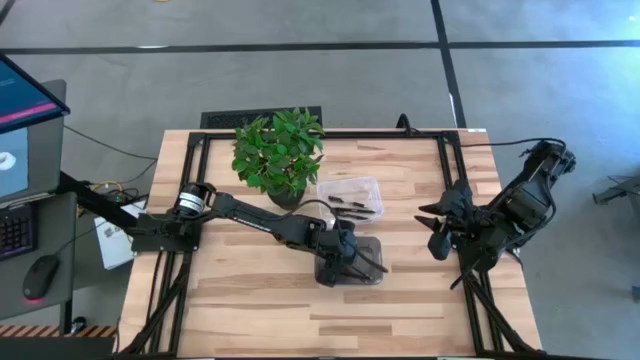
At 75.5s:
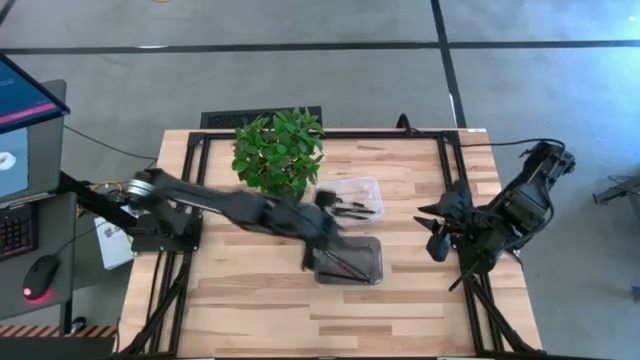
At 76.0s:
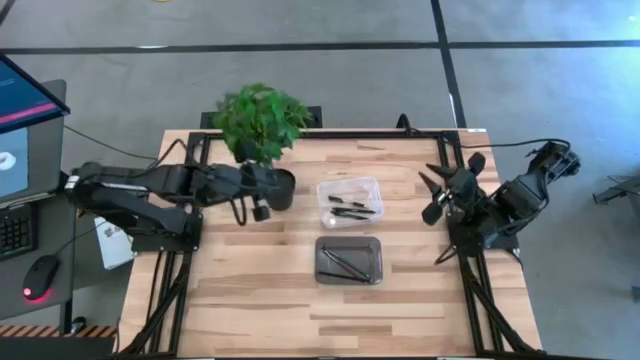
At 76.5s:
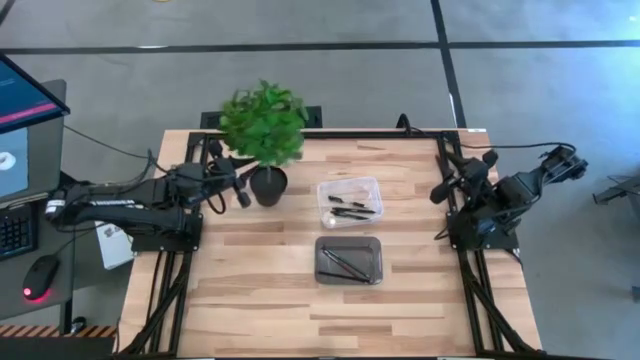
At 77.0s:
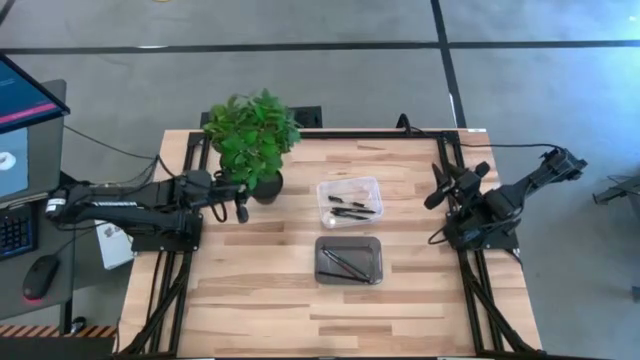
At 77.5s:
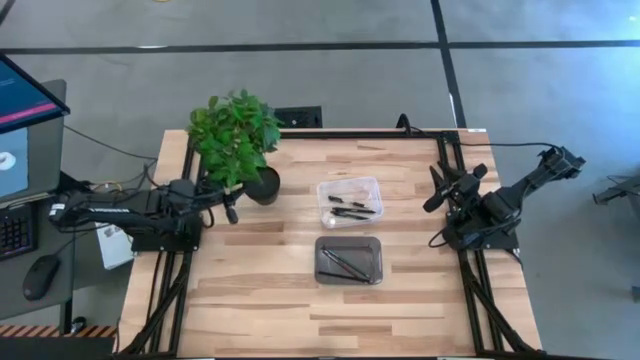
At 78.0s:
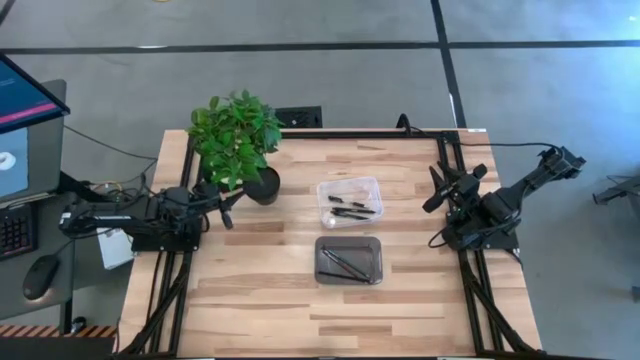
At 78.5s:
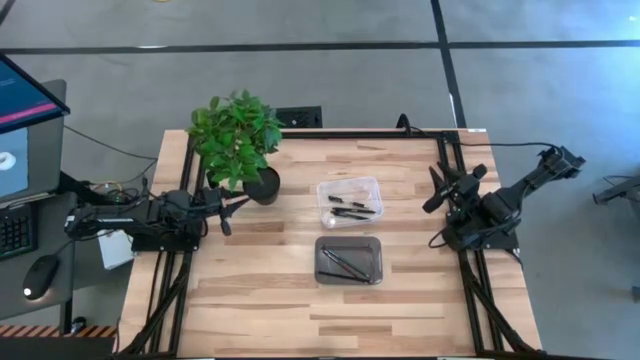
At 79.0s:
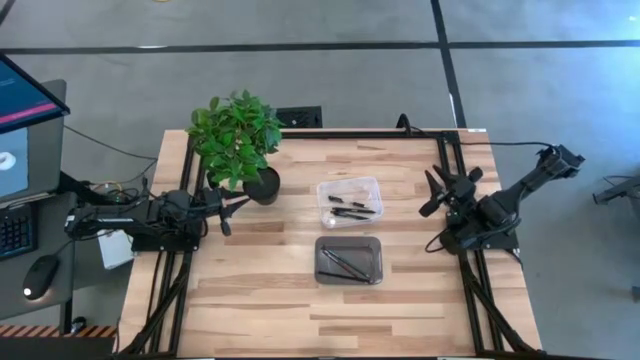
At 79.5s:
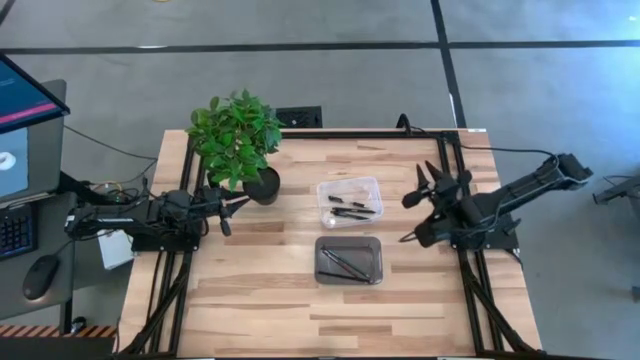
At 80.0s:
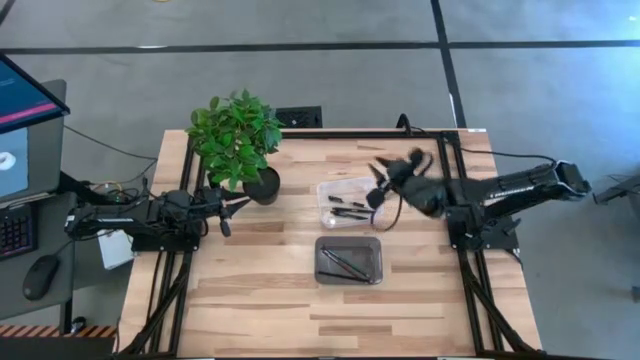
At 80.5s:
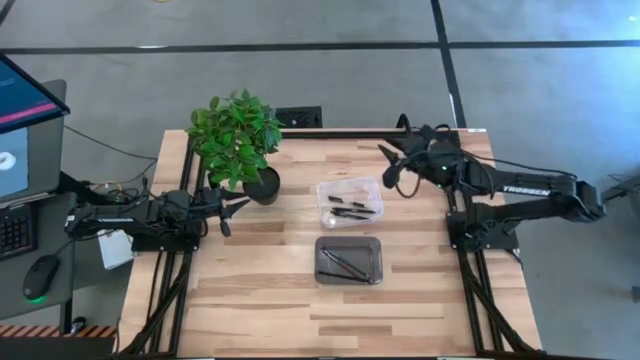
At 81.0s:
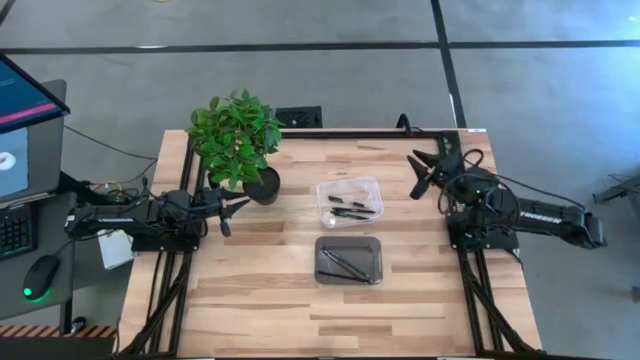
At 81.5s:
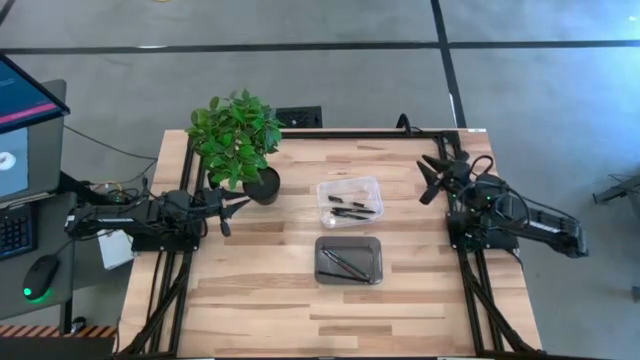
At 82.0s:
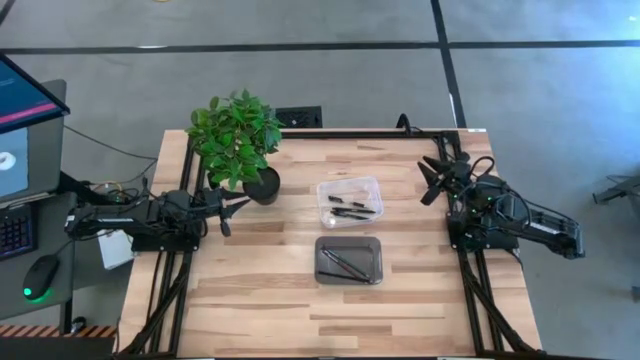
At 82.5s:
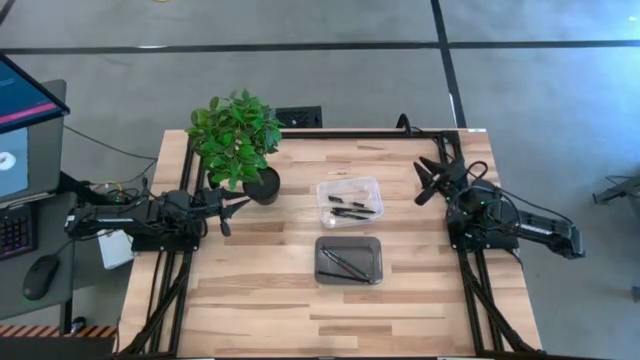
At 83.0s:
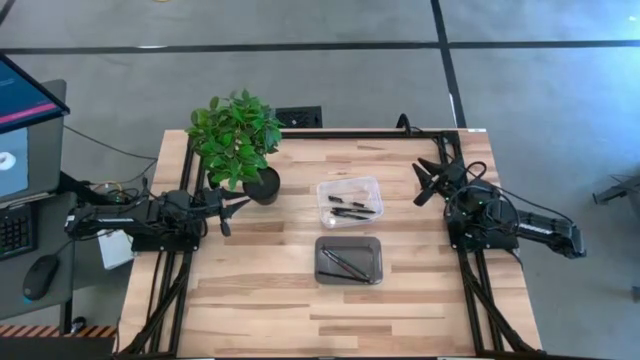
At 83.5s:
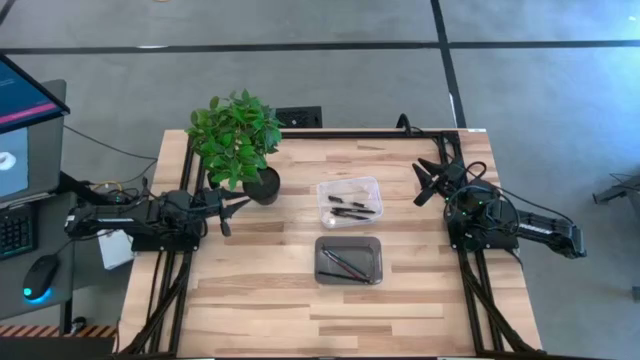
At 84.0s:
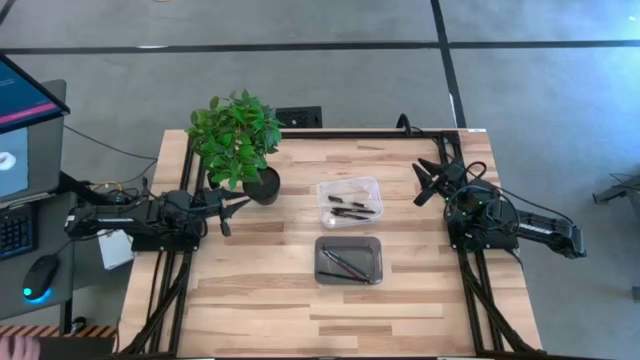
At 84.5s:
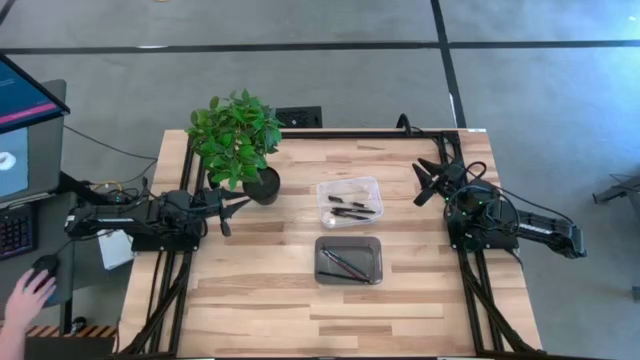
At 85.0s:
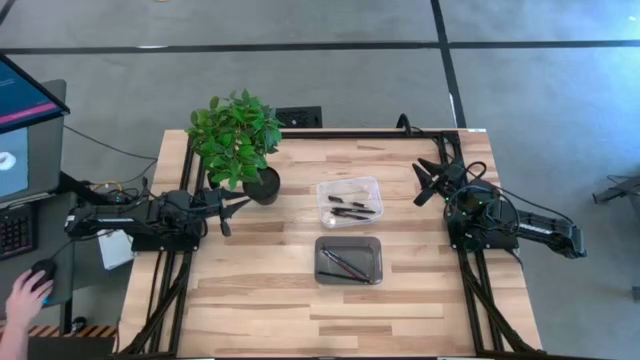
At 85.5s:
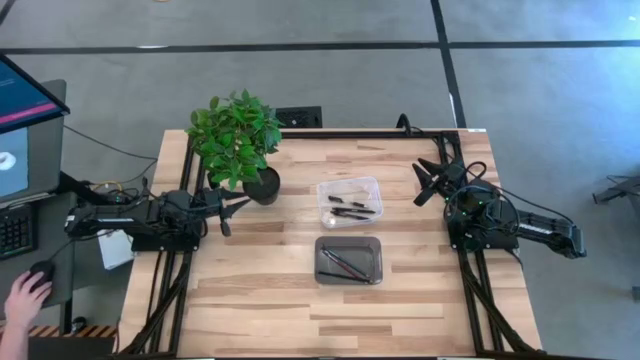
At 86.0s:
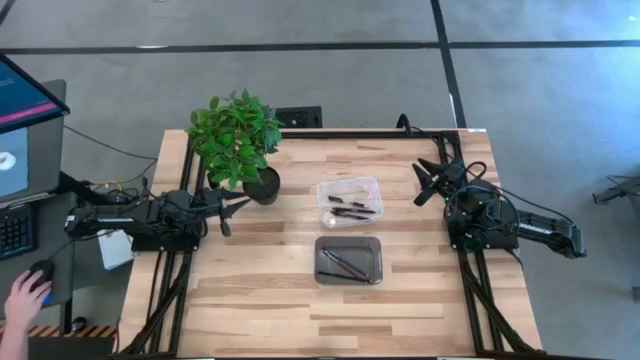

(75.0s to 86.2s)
Task: Sort pens & pencils
Return to Home Position

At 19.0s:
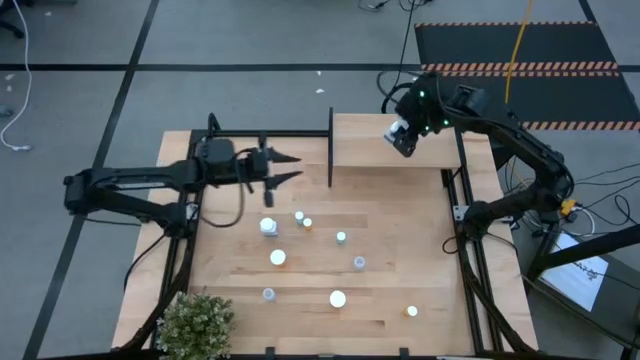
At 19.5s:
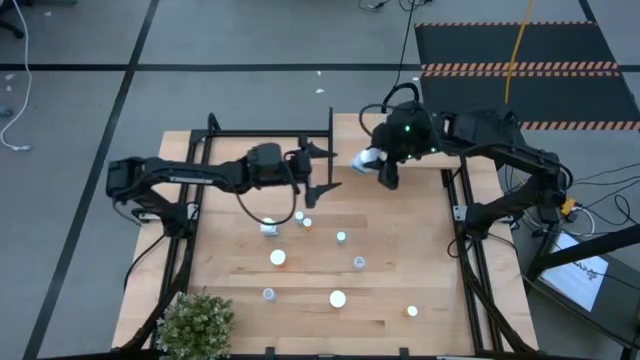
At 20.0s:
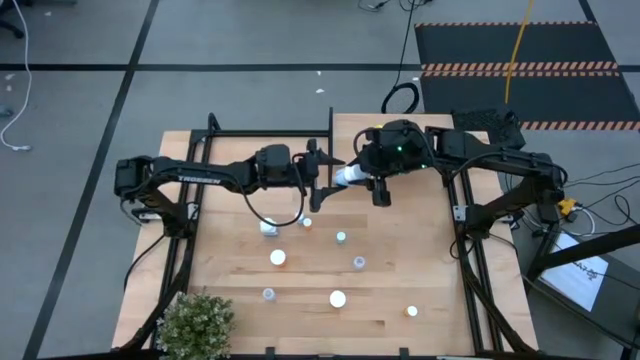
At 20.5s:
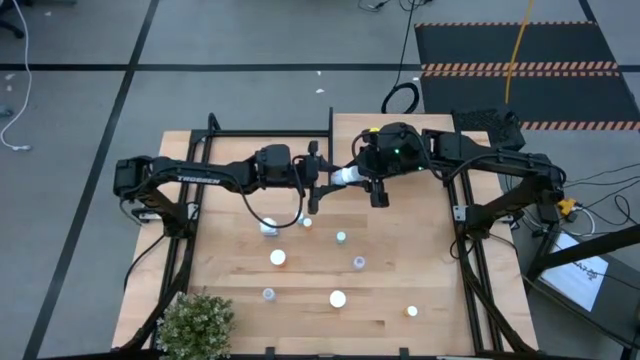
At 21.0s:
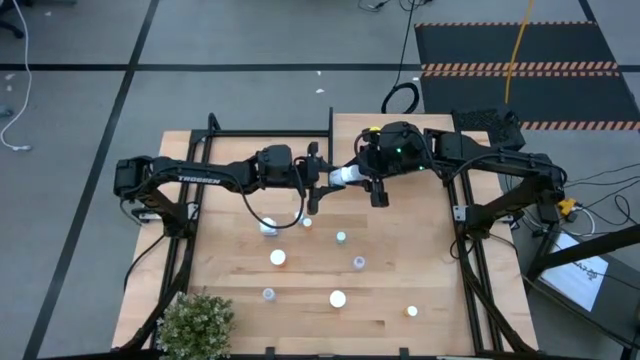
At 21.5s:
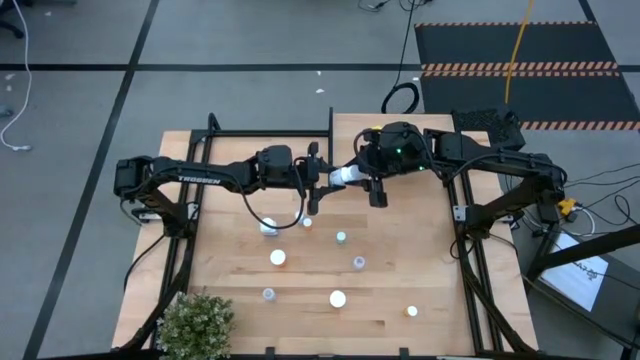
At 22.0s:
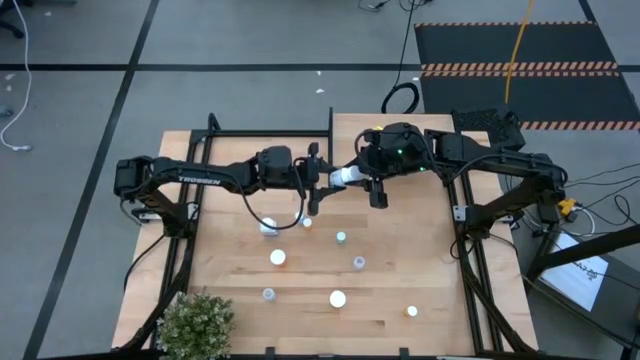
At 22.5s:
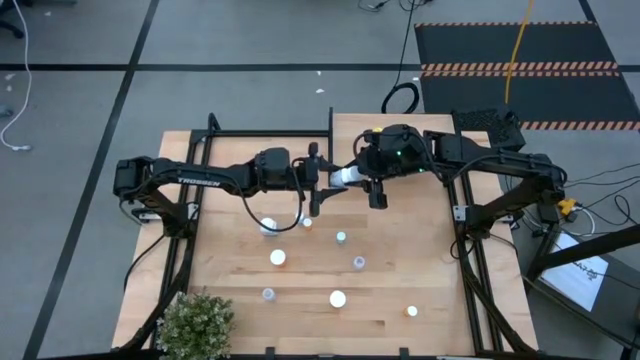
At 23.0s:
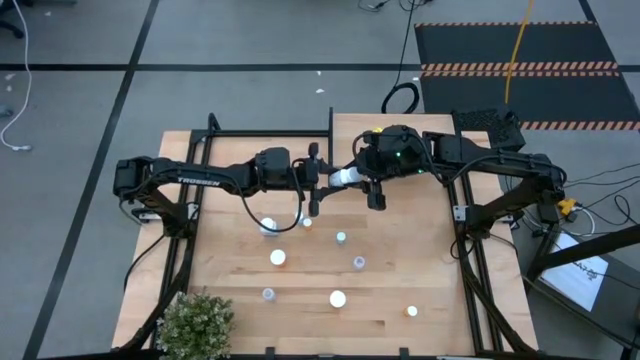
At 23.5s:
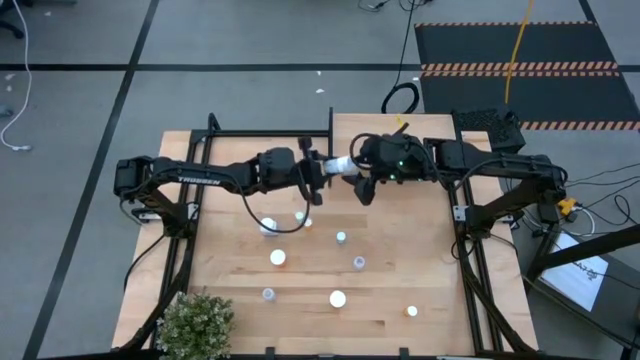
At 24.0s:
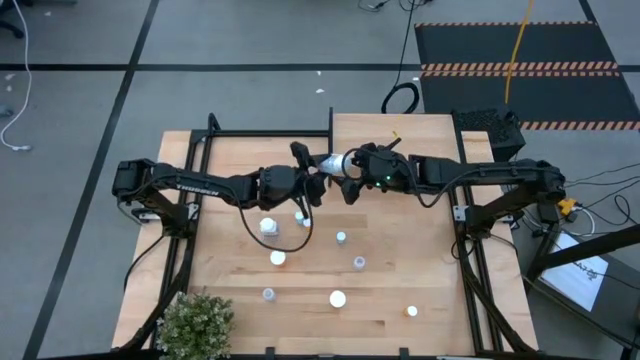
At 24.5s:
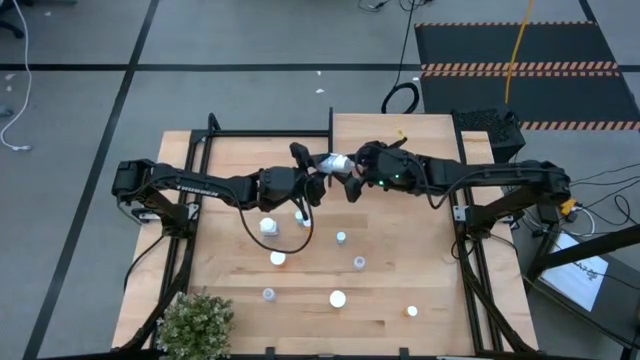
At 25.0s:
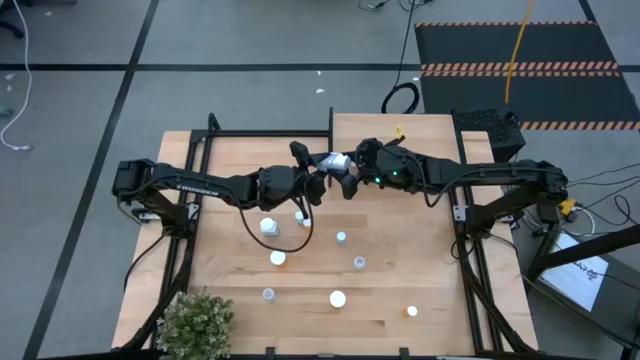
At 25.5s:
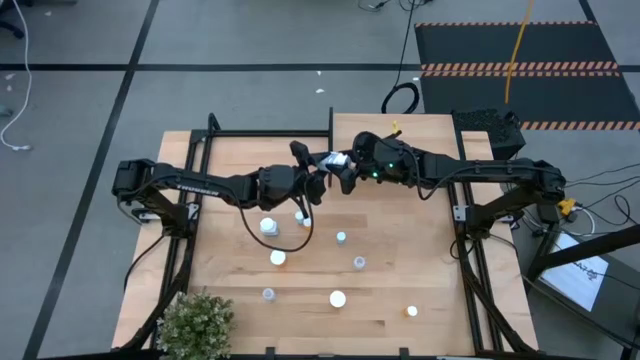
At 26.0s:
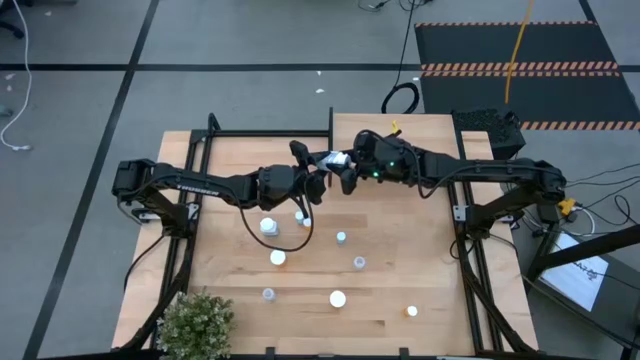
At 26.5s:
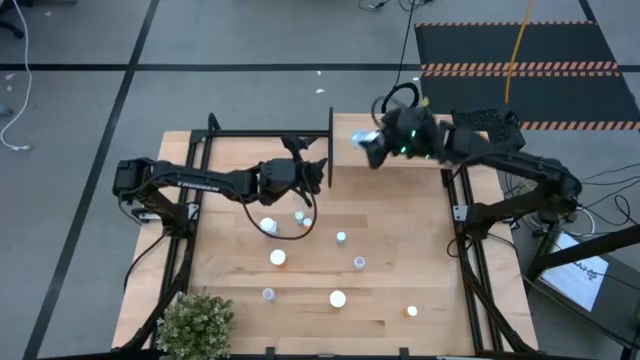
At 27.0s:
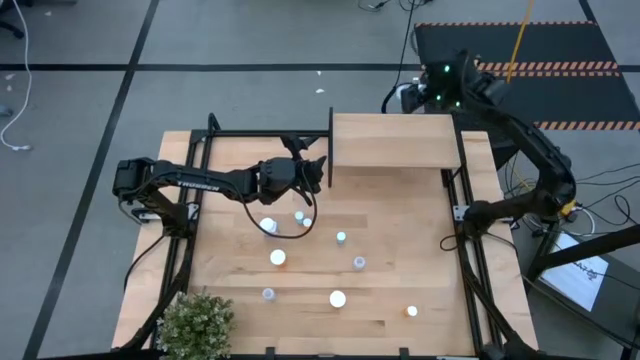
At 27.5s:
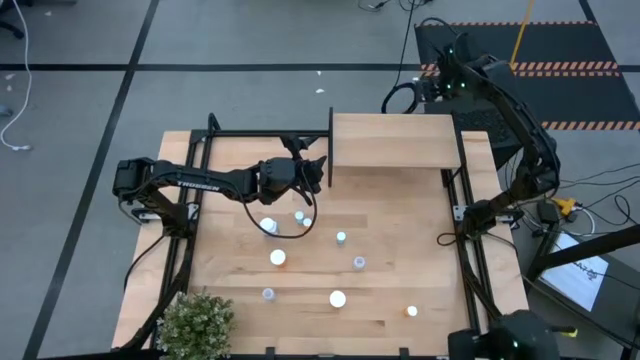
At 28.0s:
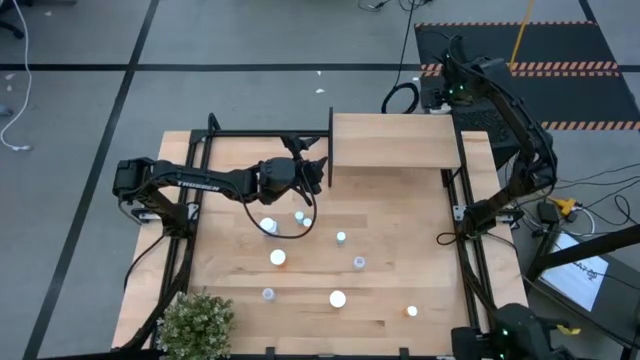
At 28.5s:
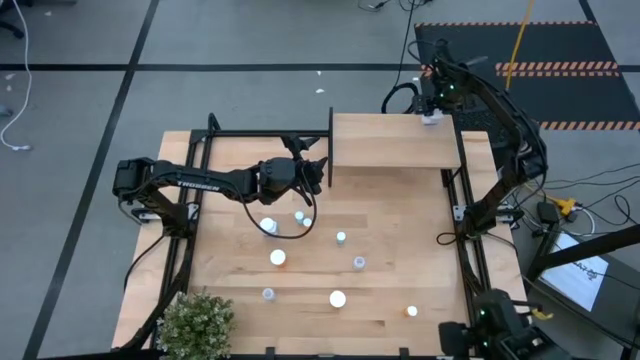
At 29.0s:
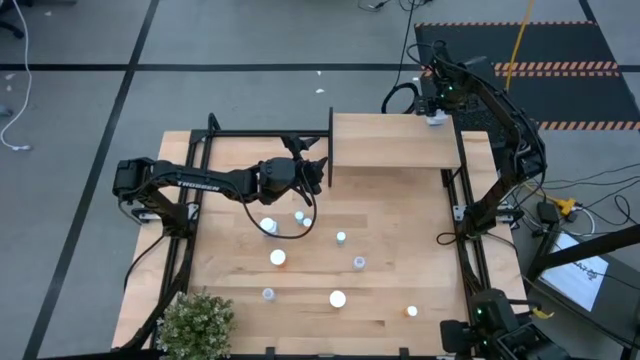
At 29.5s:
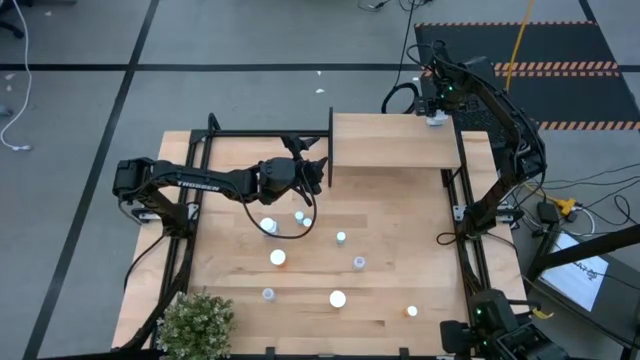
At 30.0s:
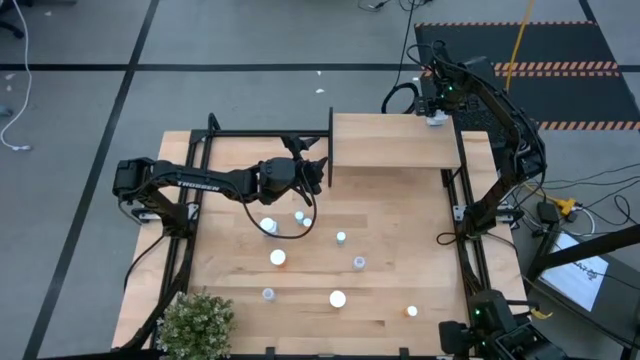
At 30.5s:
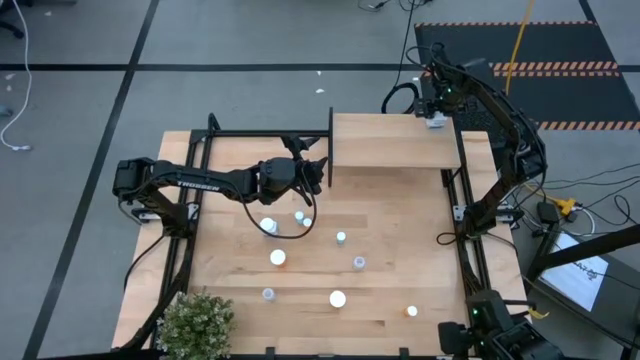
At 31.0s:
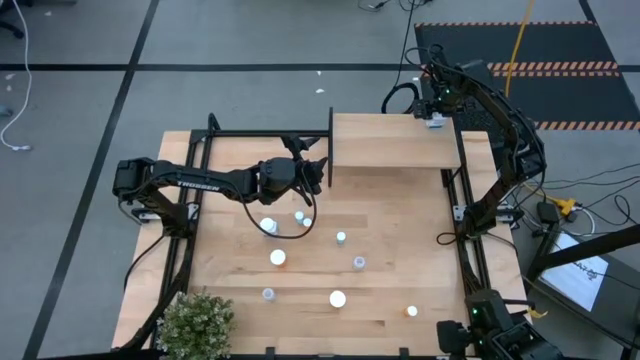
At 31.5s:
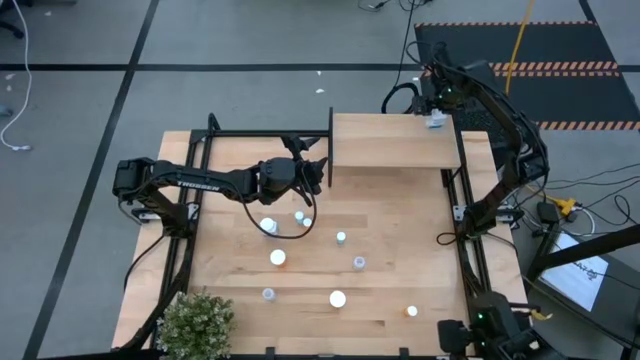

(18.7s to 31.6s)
Task: Pick and place medicine bottles onto shelf by color
Put the bottom white pill bottle on the shelf
